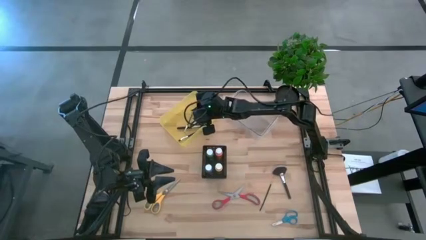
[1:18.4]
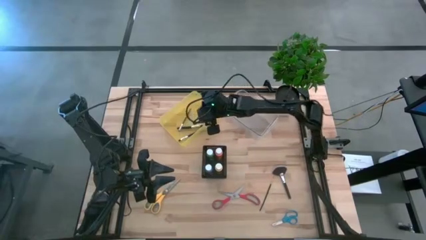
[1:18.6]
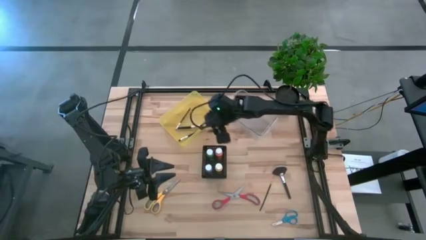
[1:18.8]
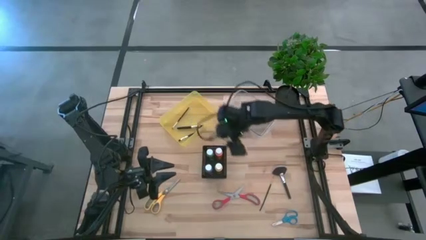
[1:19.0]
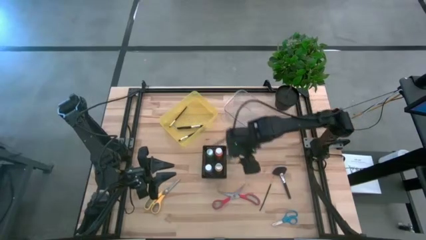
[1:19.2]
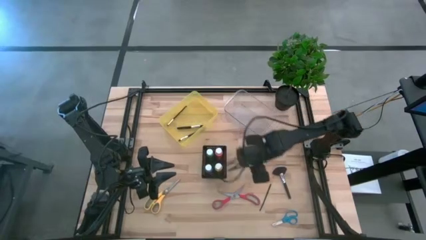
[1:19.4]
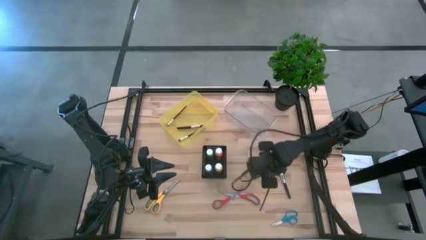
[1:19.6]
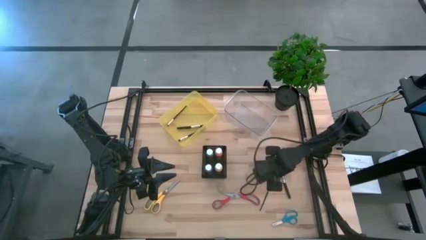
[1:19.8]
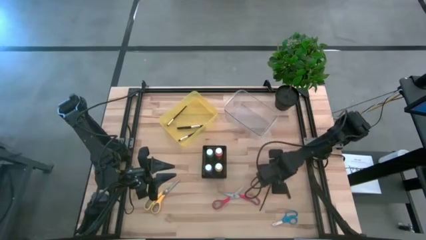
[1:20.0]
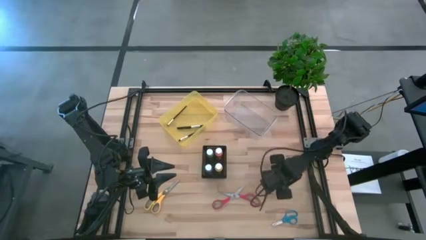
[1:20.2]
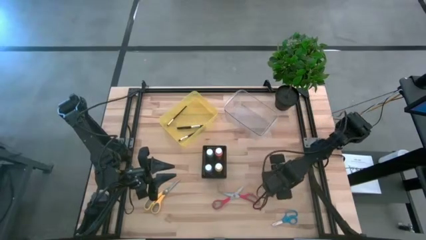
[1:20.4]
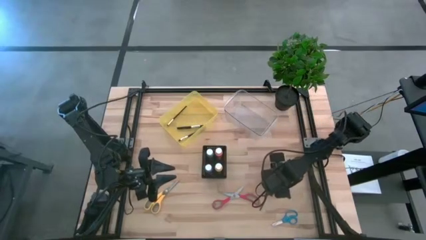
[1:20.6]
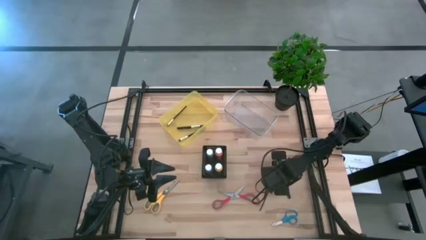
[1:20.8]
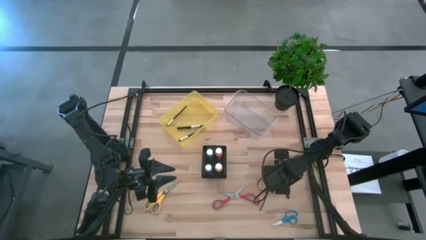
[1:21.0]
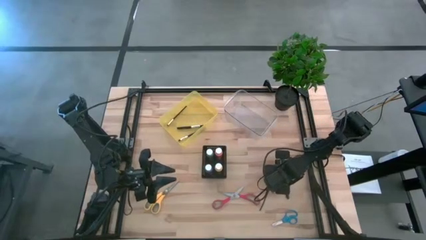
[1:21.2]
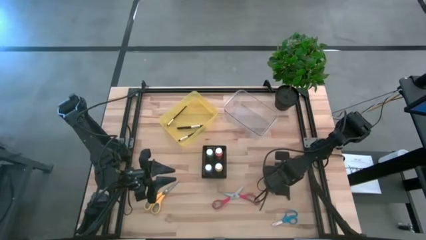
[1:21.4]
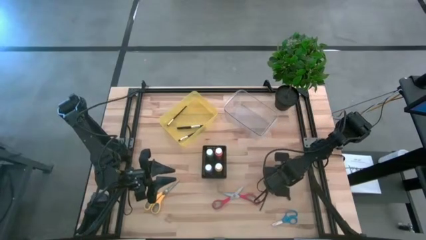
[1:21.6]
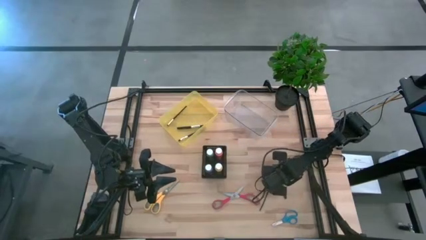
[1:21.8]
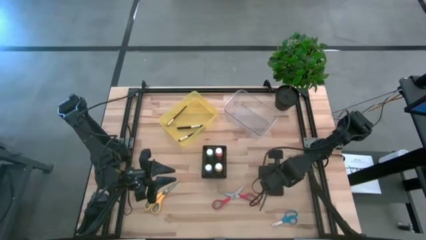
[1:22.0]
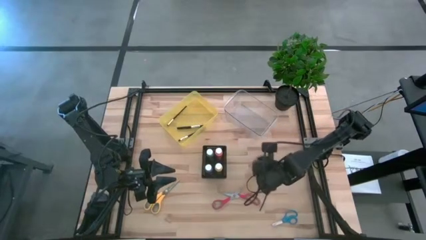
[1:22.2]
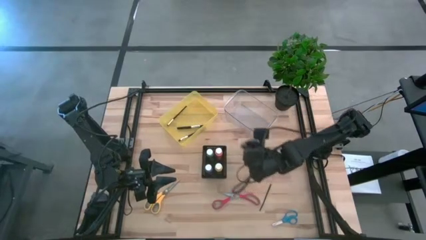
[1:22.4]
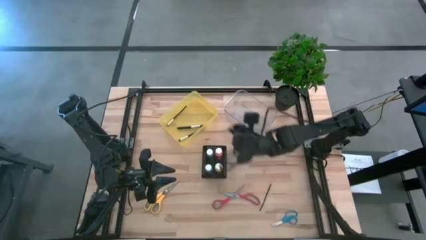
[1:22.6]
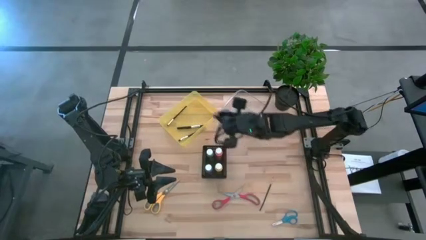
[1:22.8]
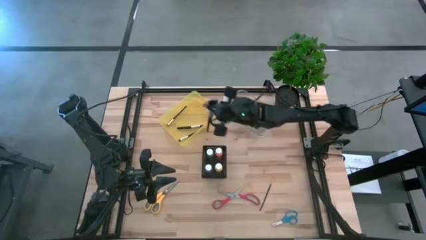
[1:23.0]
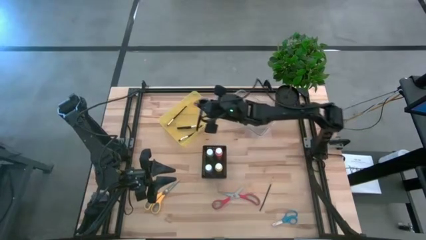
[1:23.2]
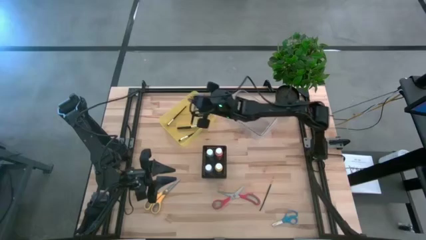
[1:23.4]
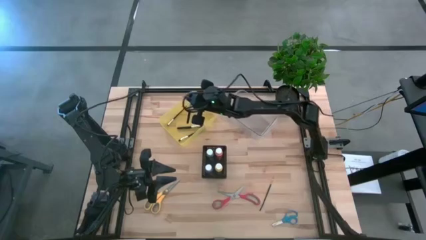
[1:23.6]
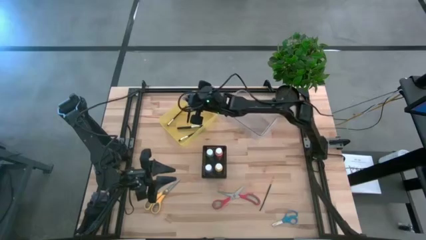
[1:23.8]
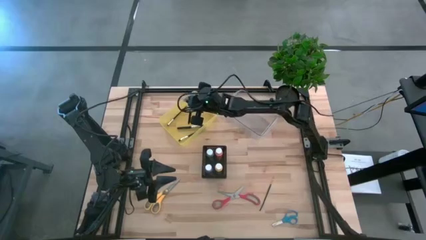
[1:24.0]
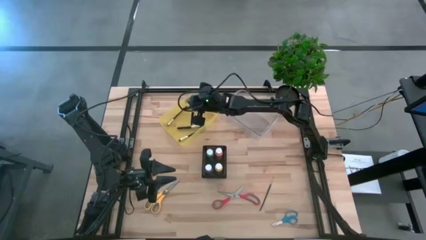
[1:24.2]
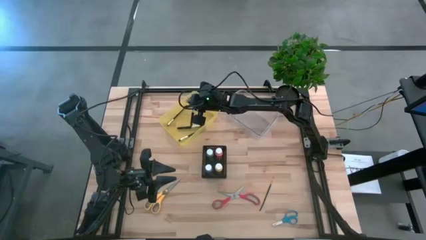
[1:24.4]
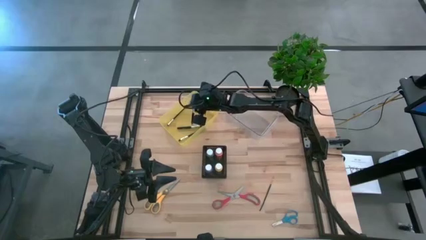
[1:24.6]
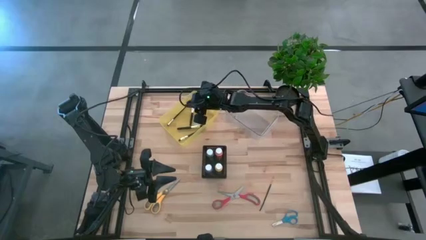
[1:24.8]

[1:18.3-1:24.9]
Task: Pick & Place Paint Supplies
Put the black highlighter brush into the yellow bin

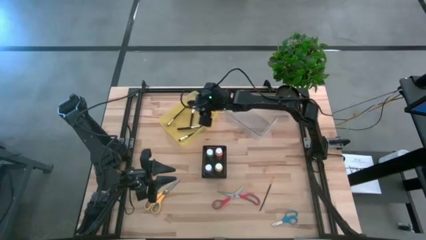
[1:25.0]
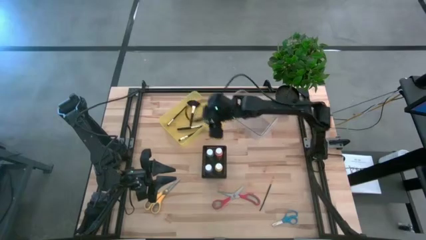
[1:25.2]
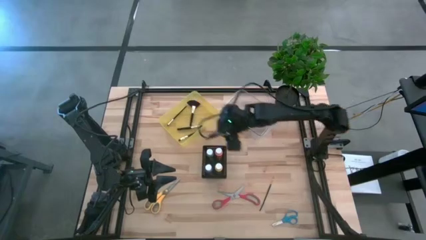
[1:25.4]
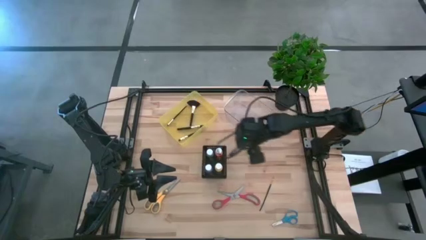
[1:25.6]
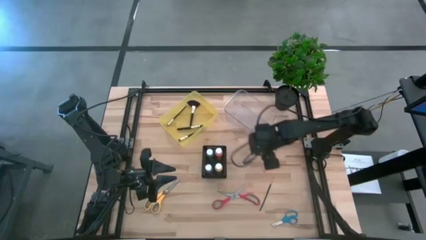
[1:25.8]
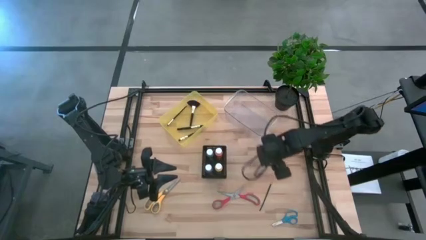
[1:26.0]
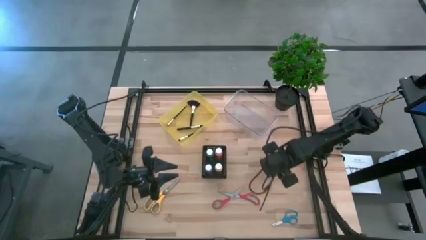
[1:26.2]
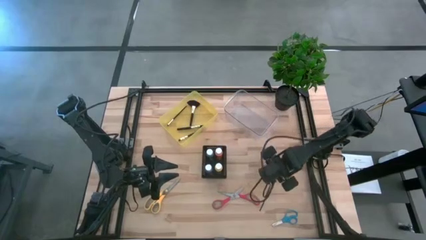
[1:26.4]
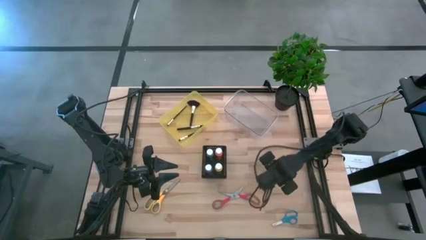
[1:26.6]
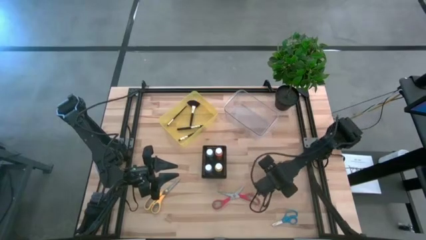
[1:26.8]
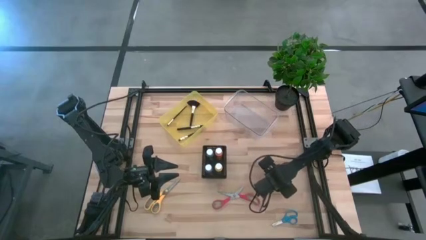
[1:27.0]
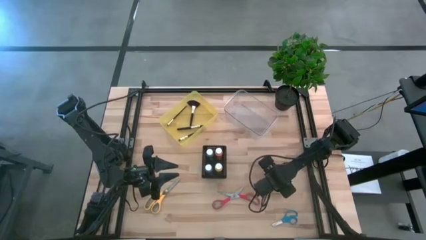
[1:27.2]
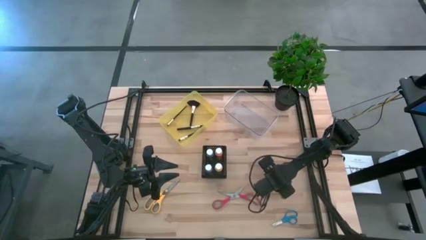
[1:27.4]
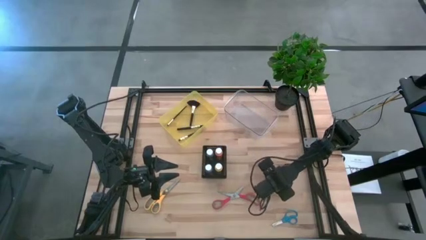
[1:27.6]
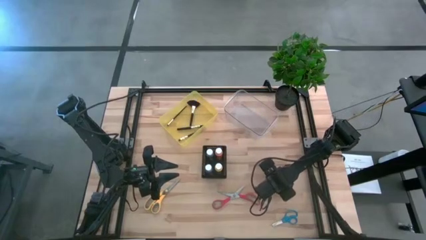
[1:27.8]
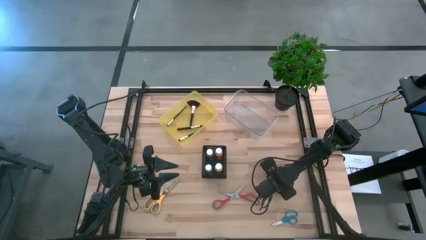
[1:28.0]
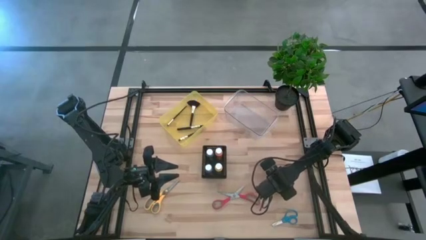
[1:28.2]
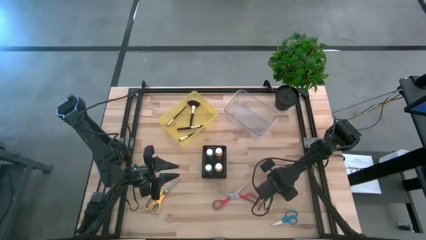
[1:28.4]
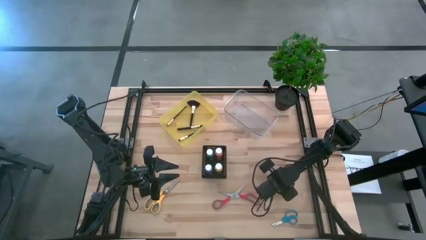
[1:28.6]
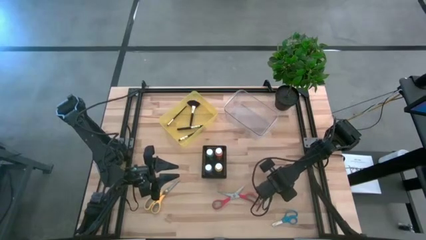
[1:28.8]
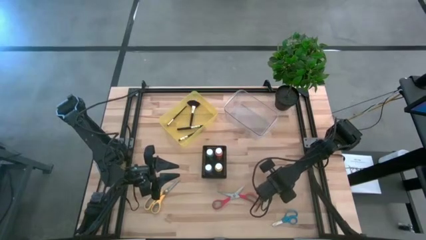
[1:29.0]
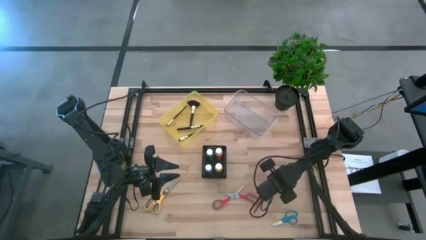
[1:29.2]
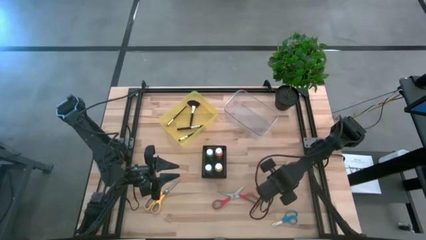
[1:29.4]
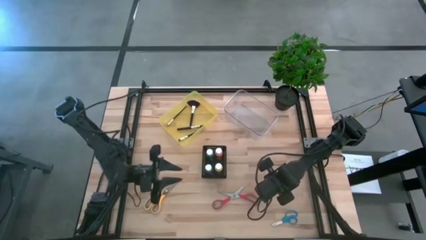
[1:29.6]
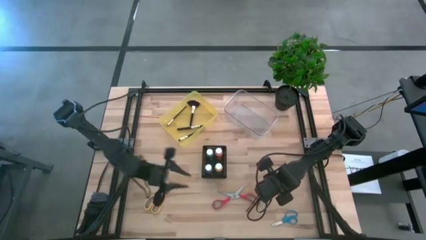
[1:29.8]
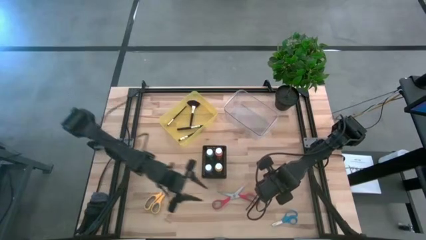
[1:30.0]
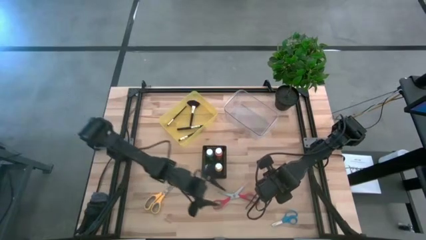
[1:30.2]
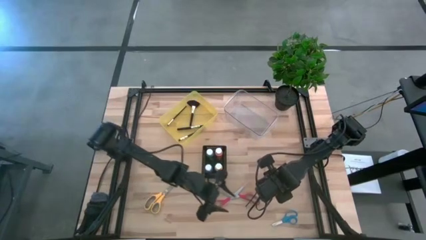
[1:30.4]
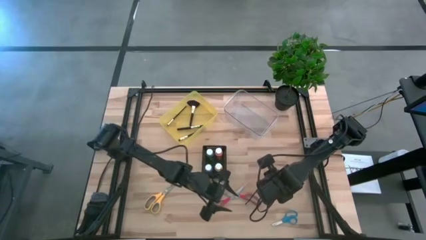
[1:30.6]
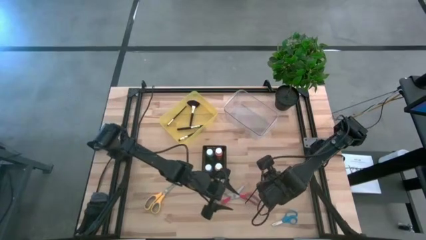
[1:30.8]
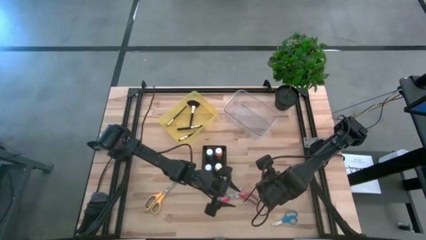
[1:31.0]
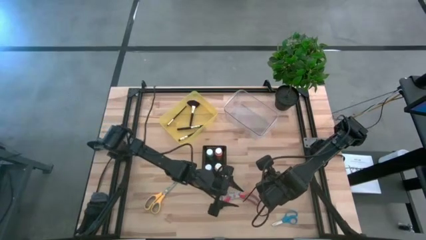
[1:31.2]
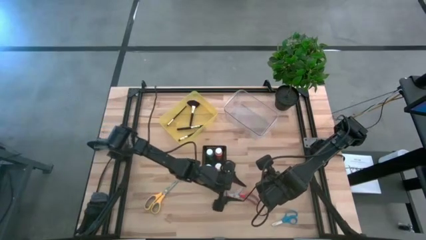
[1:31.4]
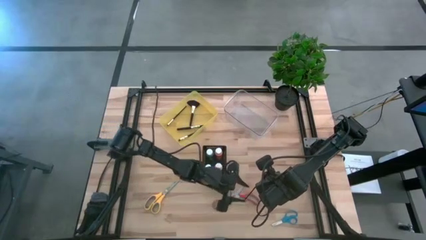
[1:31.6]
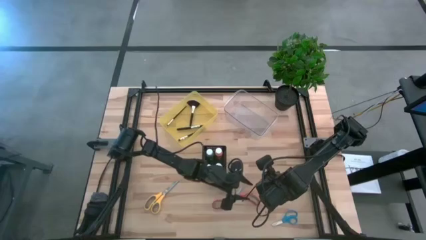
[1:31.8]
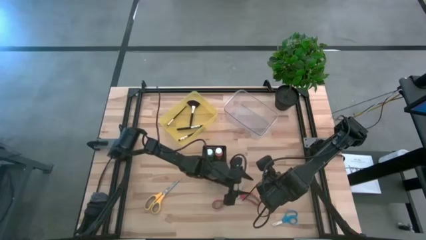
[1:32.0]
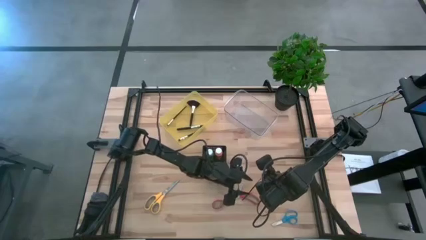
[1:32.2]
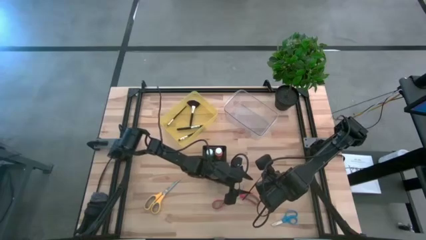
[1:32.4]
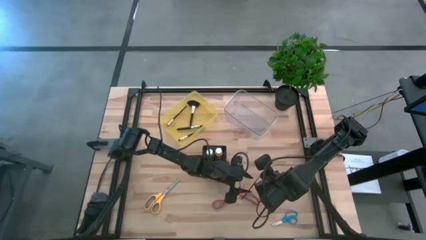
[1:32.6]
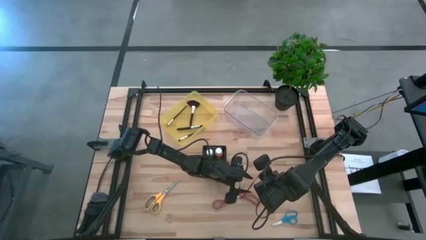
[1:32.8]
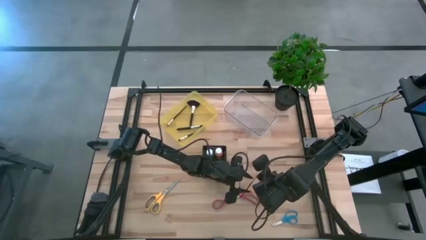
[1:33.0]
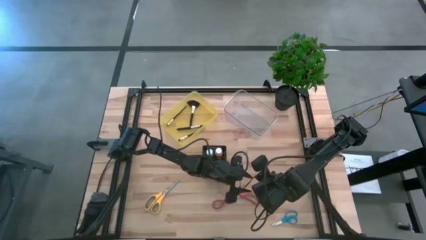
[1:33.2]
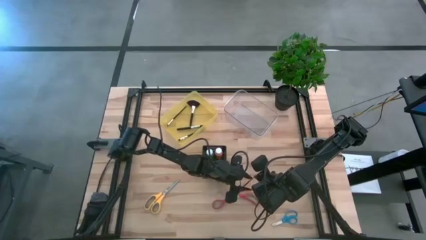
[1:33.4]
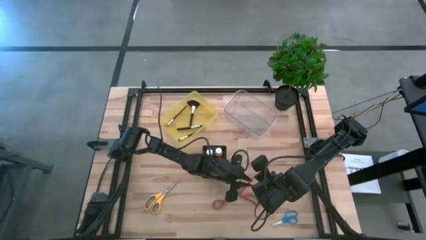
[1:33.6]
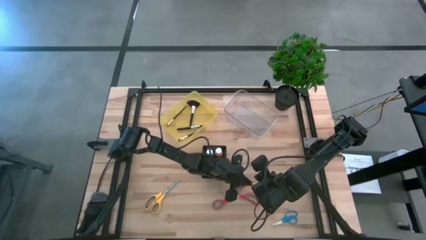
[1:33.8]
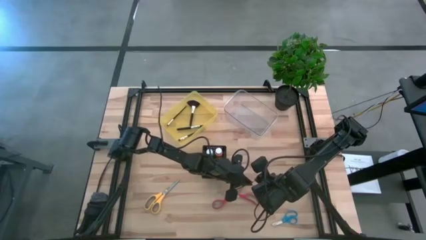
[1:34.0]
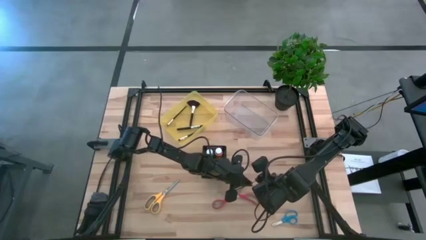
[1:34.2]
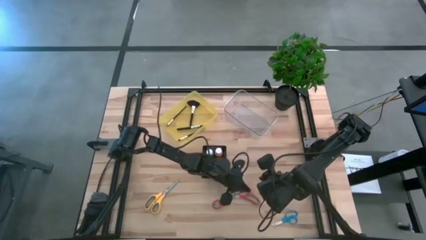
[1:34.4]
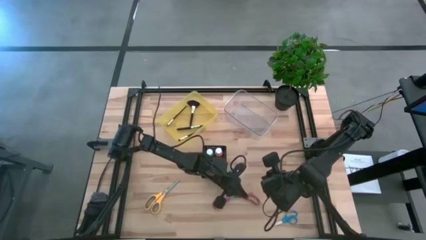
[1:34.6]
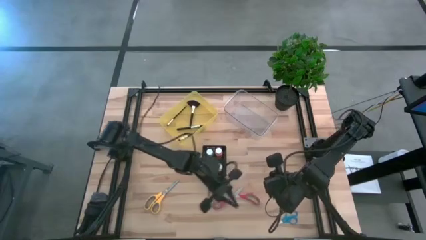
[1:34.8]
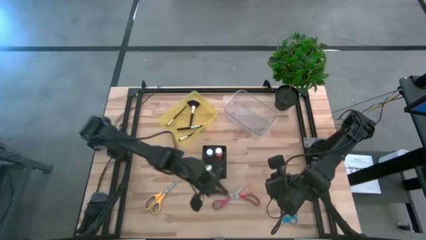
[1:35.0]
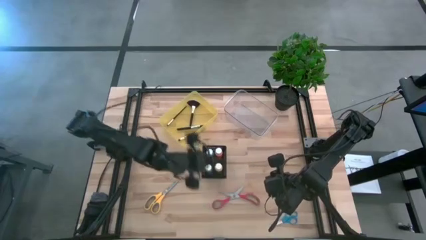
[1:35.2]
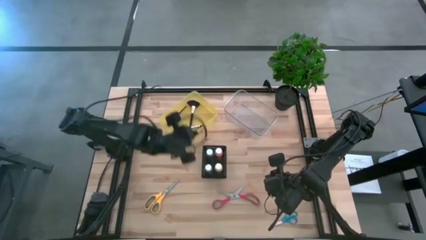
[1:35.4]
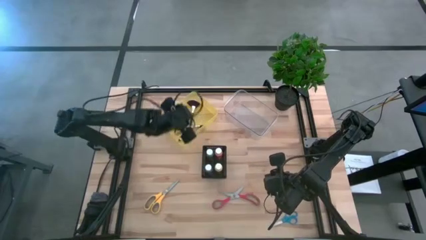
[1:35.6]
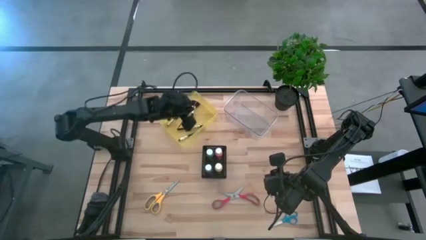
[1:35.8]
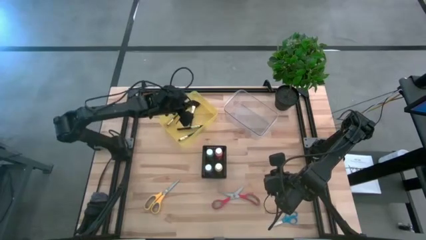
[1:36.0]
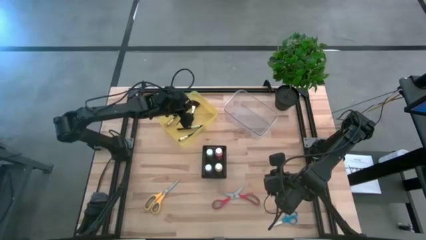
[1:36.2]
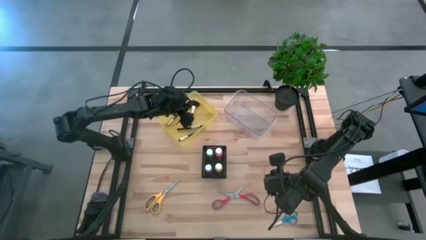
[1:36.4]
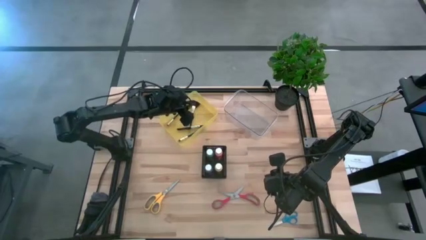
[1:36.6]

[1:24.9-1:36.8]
Put the black paint brush into the yellow bin
